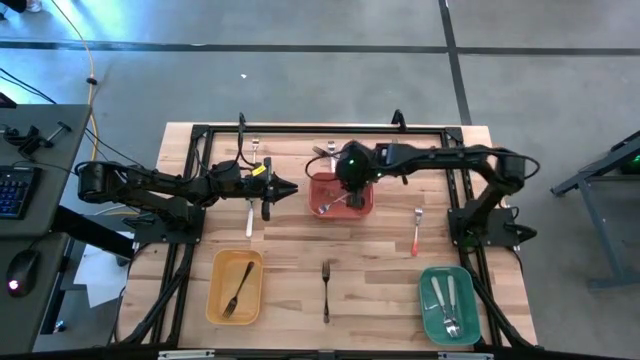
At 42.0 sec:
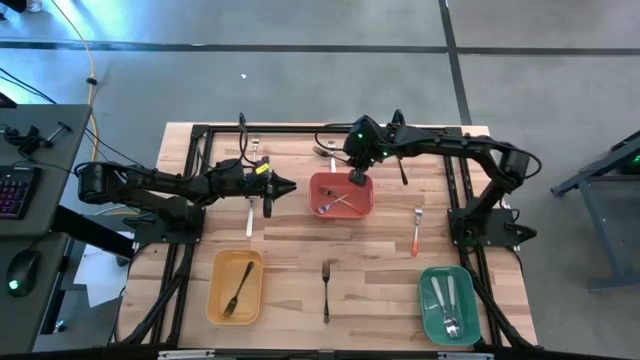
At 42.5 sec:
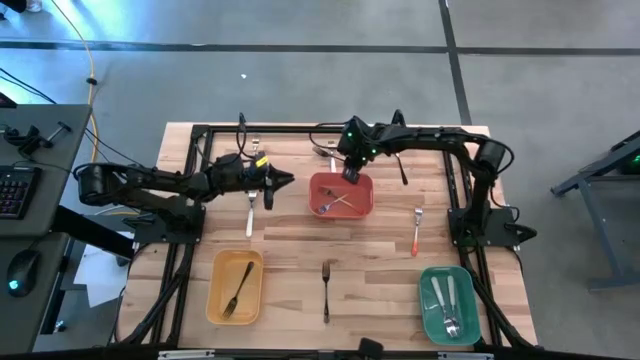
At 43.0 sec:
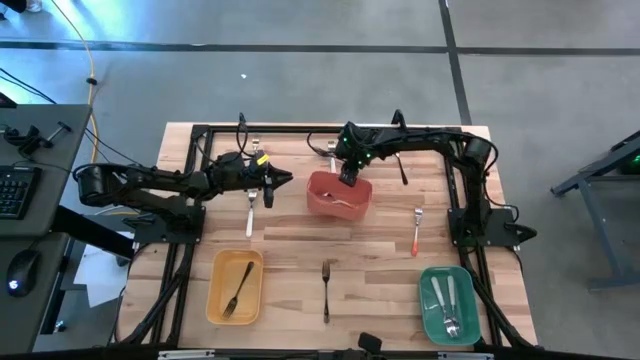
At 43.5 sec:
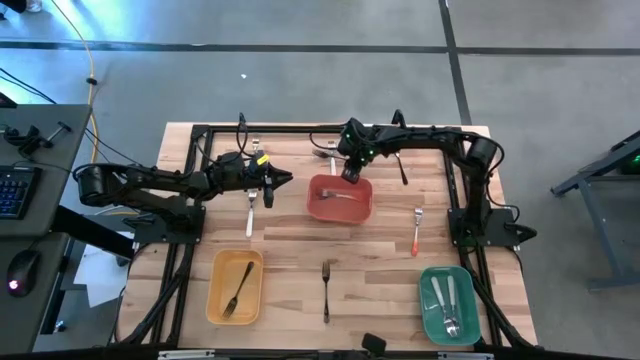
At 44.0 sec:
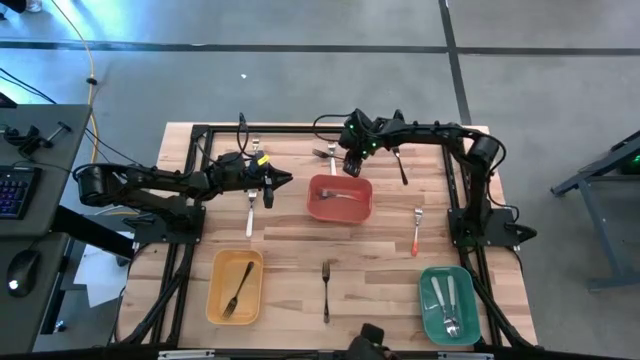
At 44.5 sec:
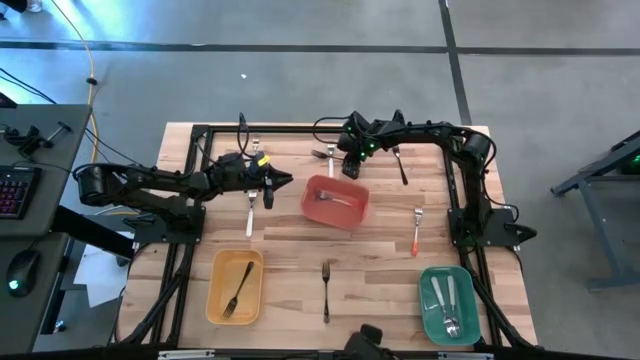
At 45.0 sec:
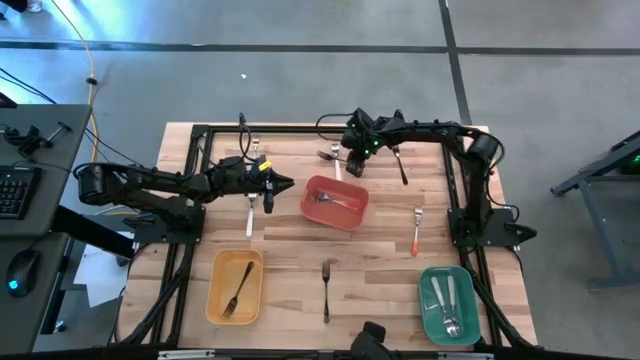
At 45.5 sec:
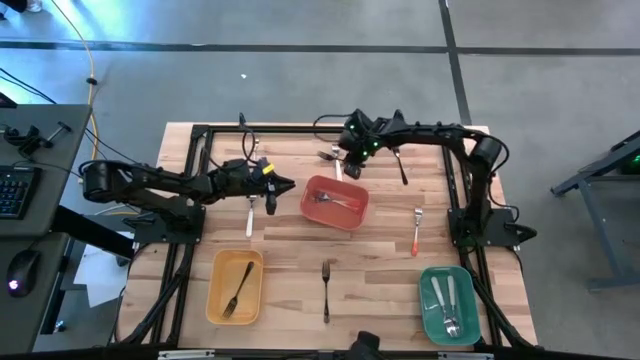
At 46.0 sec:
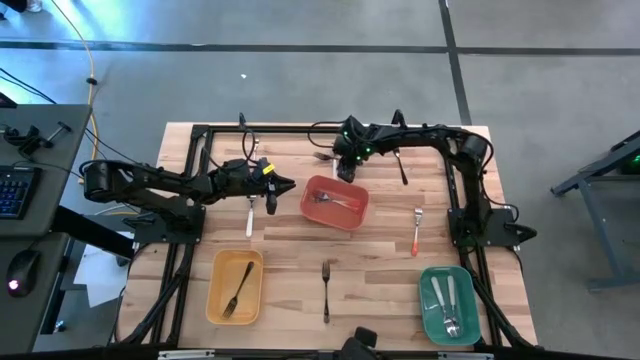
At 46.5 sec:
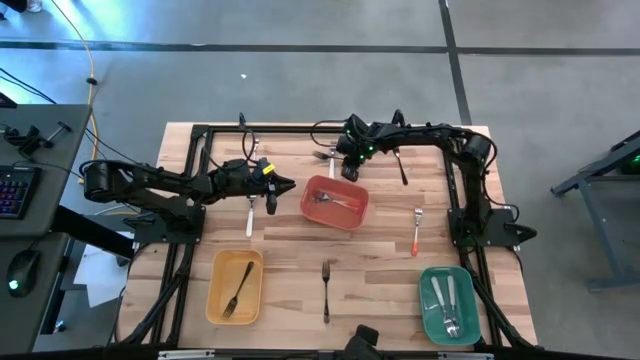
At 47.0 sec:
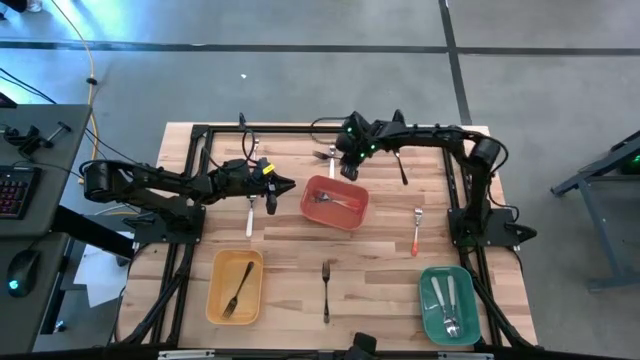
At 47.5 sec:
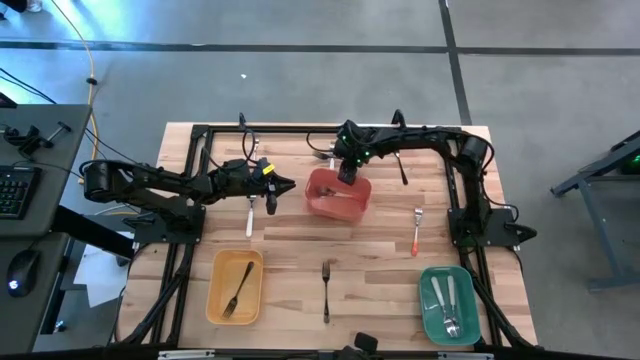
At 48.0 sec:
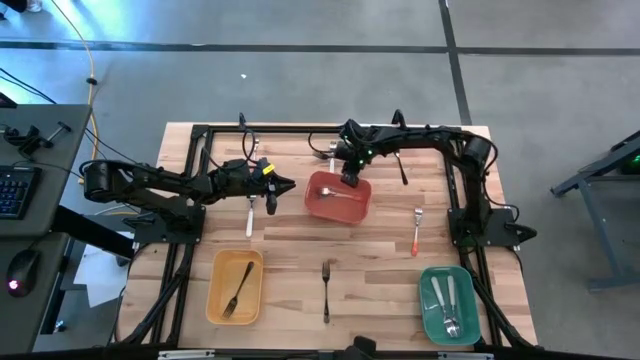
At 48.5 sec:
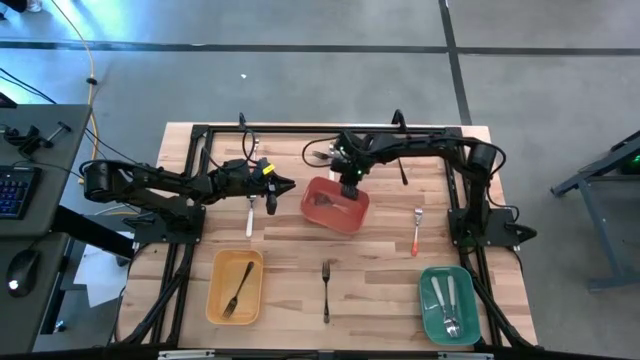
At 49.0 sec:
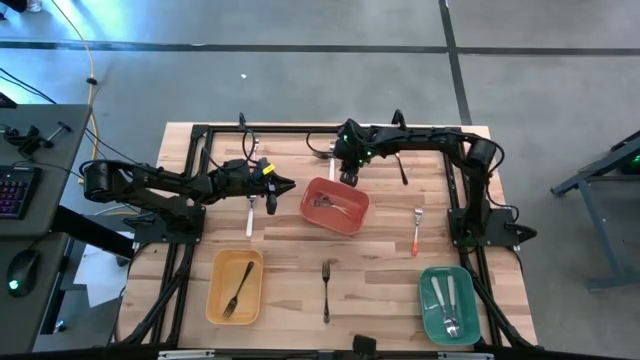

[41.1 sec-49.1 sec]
Task: Sort silverware by color (type)
Put the top left black fork into the yellow bin

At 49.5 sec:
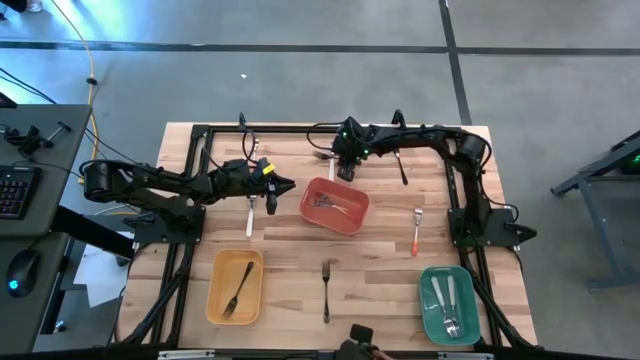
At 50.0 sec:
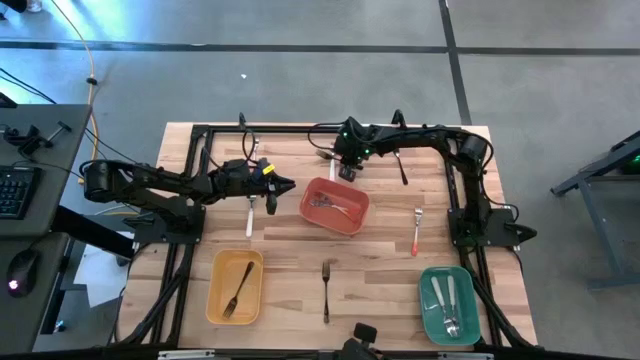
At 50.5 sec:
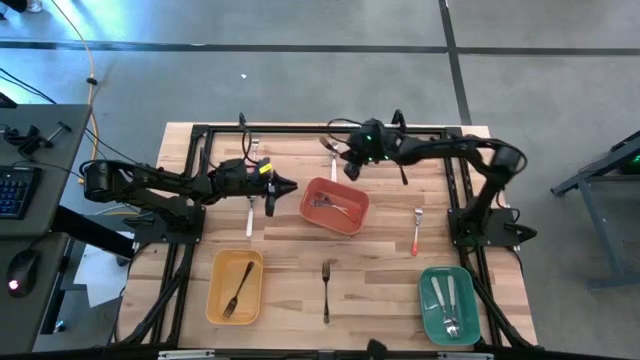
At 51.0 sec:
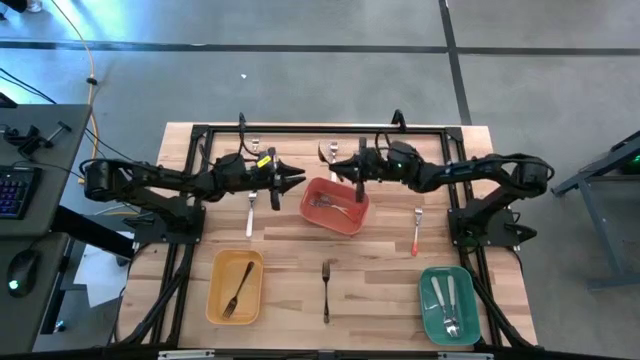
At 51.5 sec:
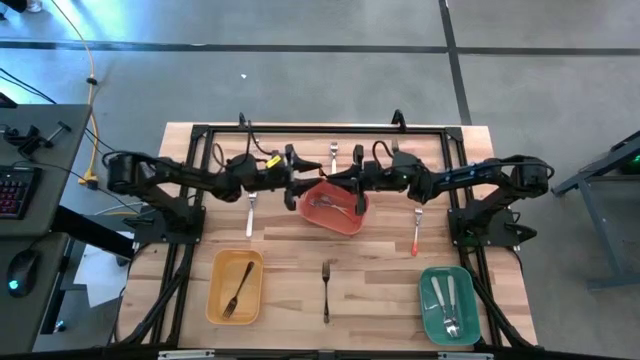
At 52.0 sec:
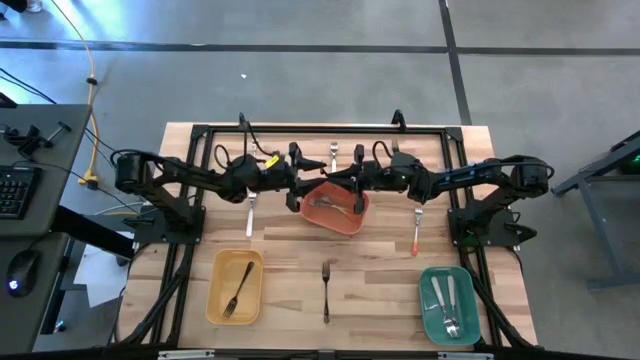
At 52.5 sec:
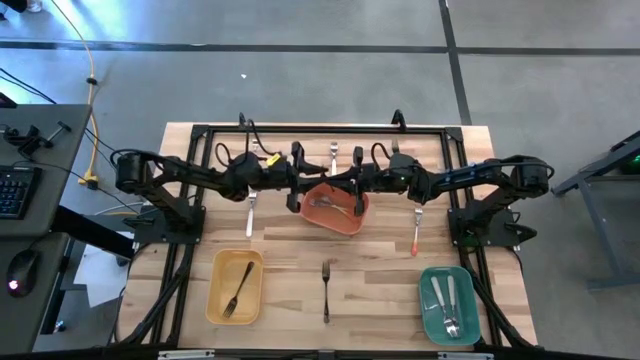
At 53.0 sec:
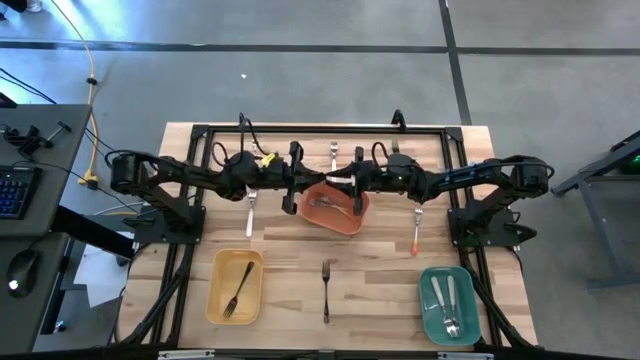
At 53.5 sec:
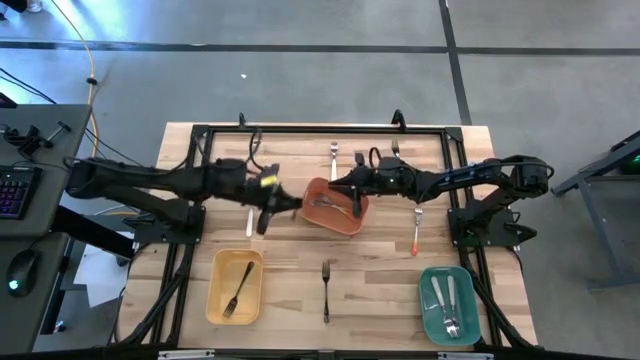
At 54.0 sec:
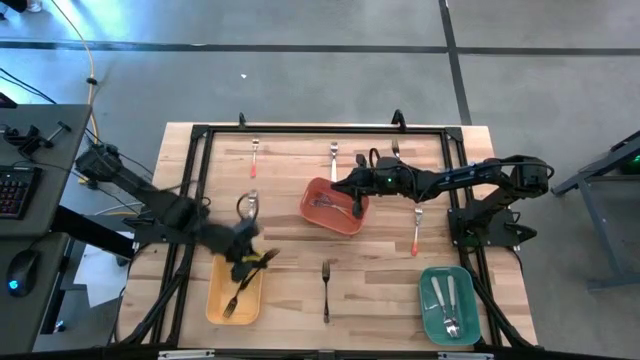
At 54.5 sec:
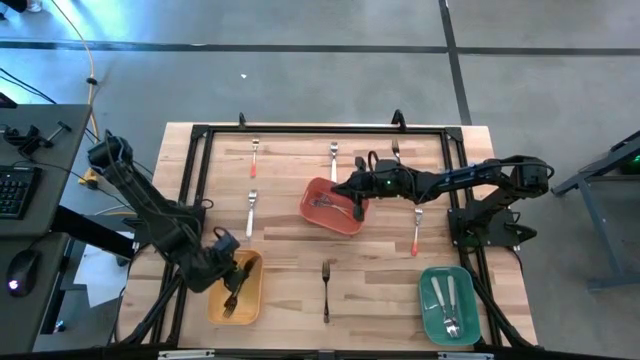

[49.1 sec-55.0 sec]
Put the top left black fork into the yellow bin

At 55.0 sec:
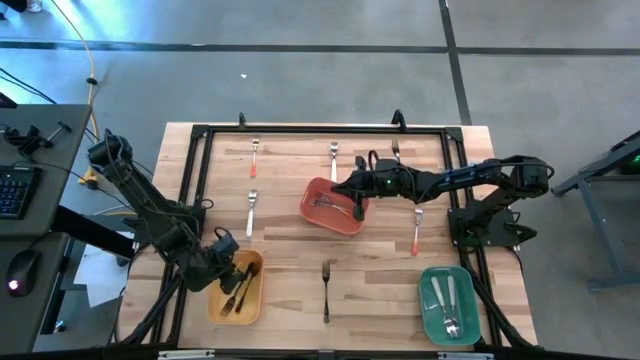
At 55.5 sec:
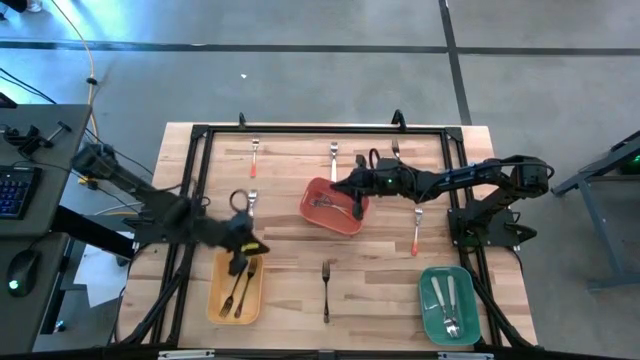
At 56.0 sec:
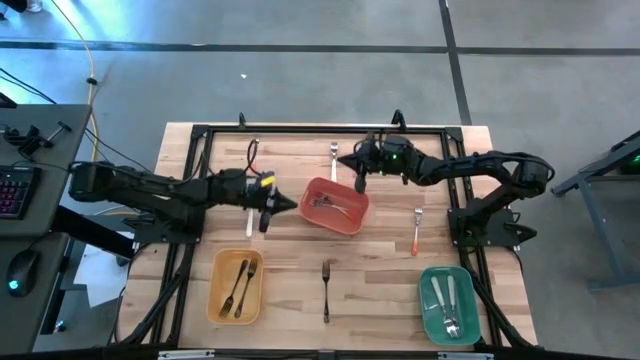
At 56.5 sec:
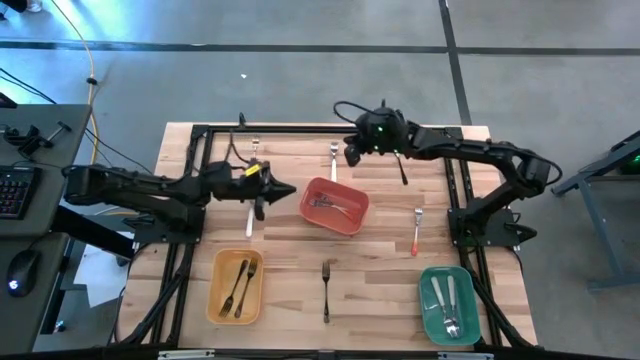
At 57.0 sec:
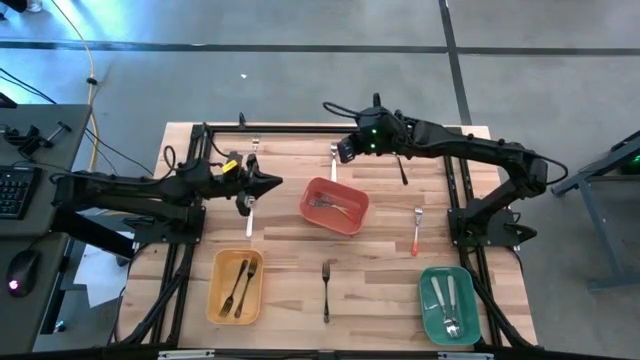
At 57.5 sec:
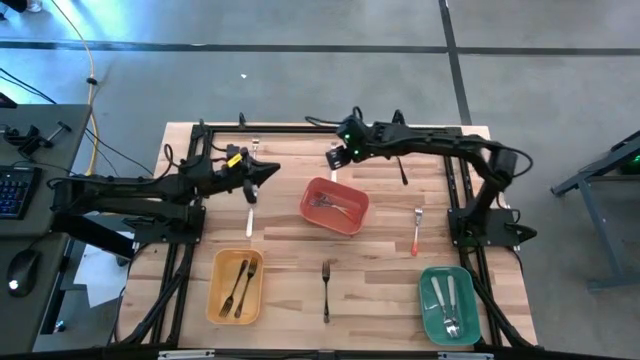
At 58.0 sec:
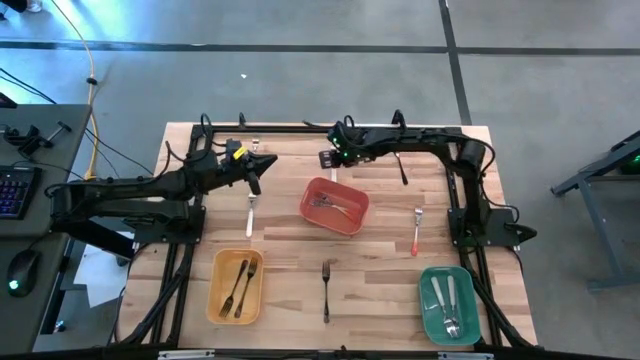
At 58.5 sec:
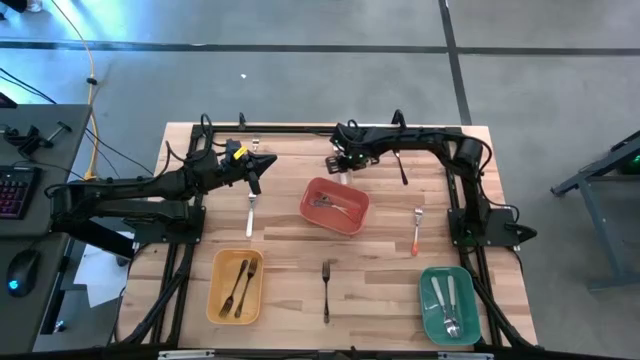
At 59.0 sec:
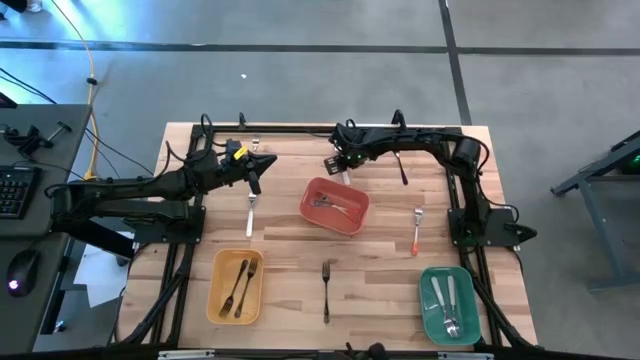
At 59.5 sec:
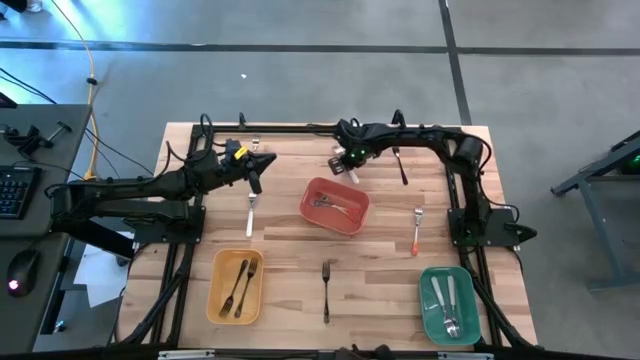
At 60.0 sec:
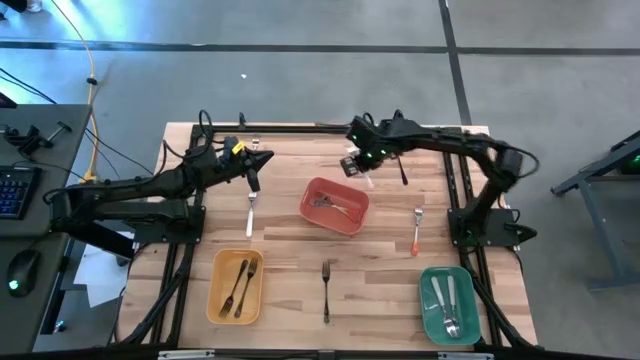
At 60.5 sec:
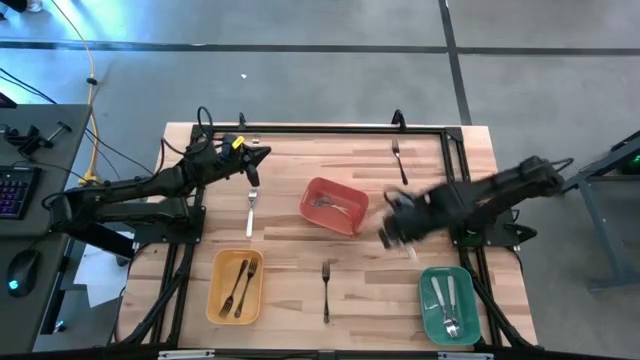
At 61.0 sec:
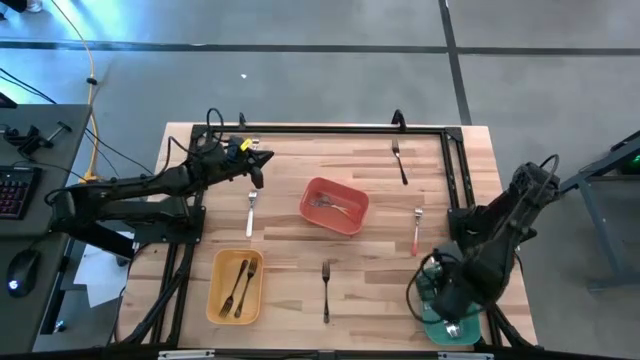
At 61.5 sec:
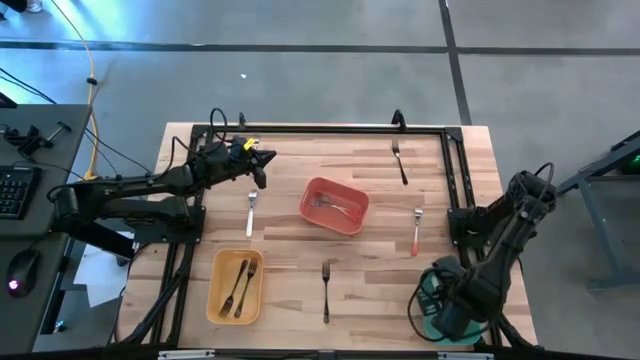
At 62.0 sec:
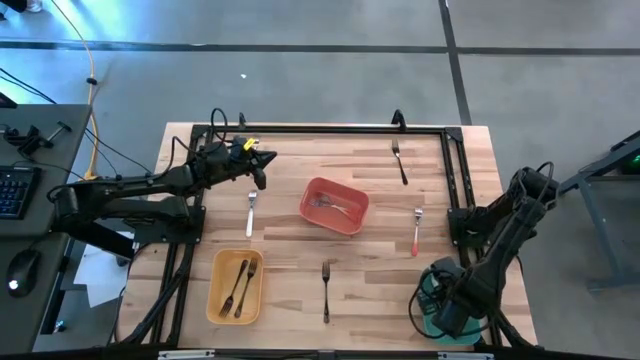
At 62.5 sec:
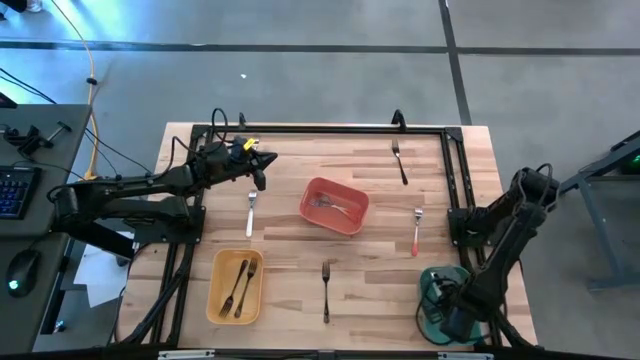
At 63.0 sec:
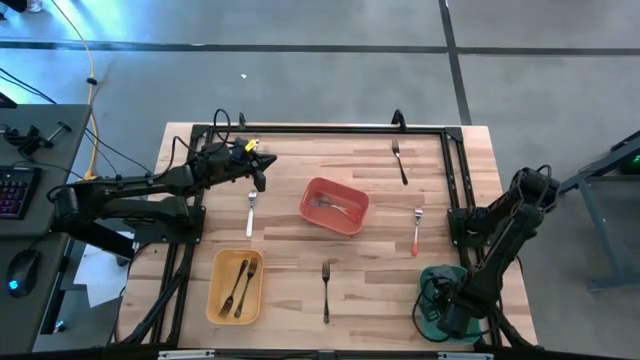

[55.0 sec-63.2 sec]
Put the top white fork into the green bin
